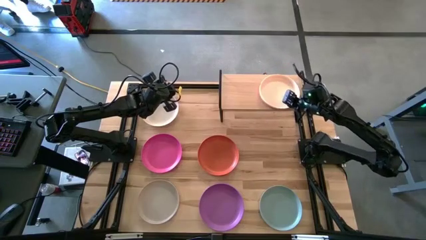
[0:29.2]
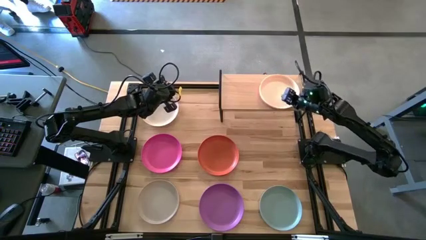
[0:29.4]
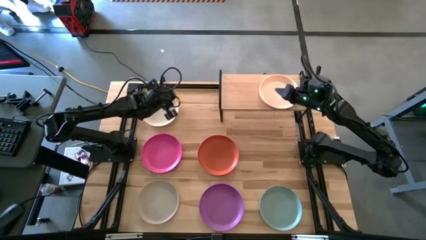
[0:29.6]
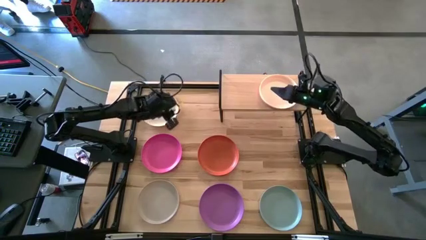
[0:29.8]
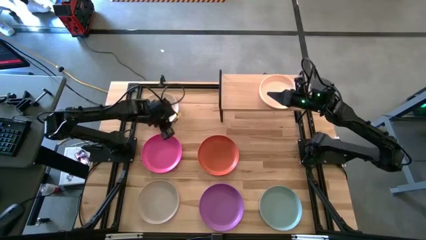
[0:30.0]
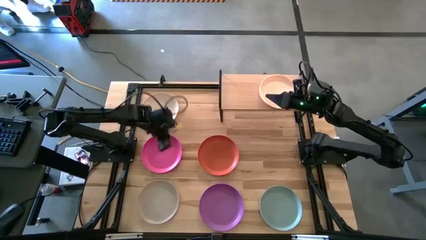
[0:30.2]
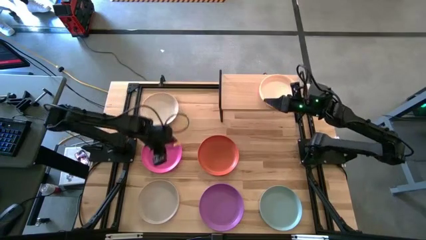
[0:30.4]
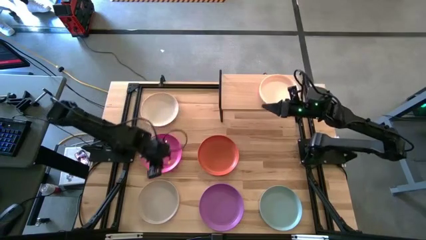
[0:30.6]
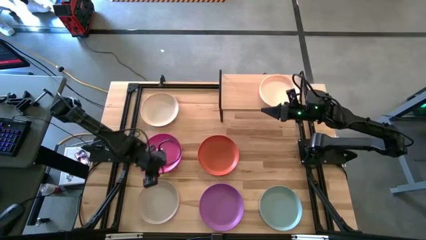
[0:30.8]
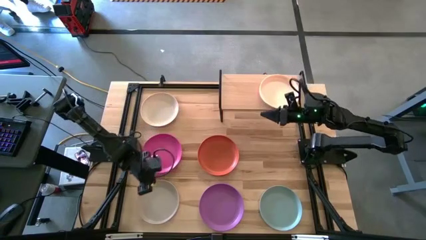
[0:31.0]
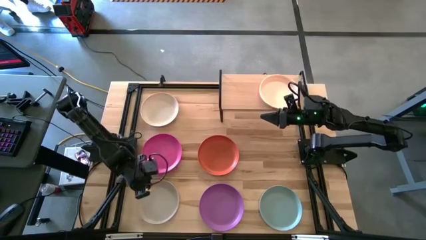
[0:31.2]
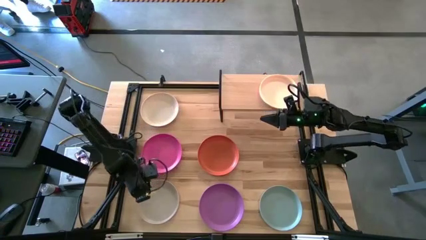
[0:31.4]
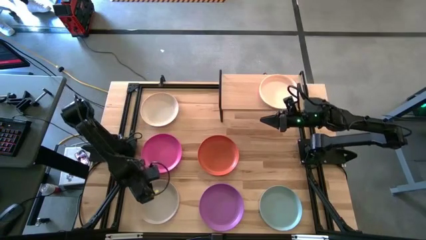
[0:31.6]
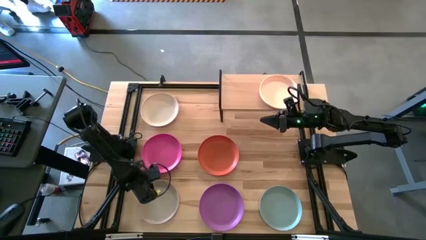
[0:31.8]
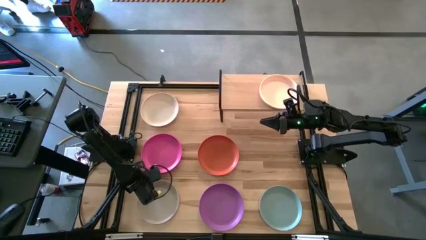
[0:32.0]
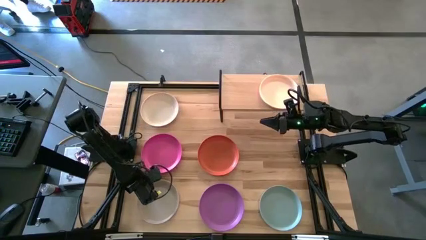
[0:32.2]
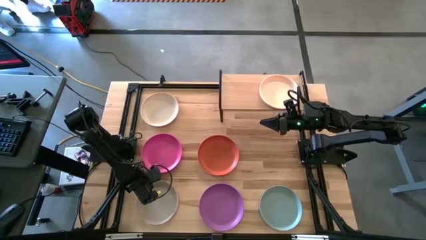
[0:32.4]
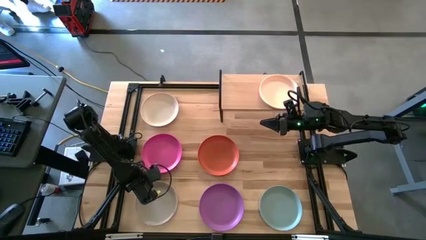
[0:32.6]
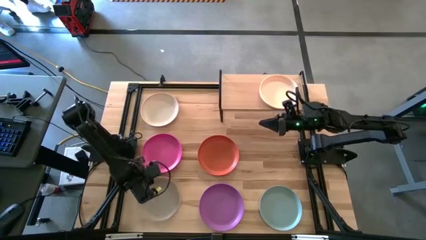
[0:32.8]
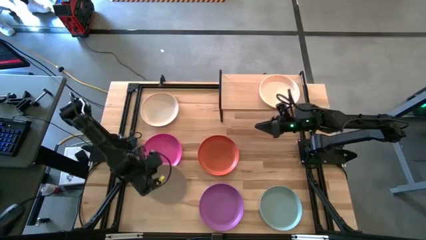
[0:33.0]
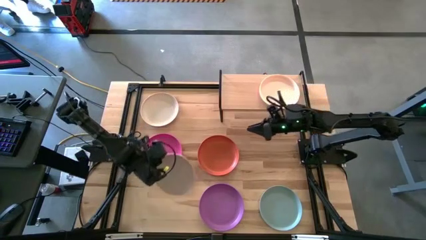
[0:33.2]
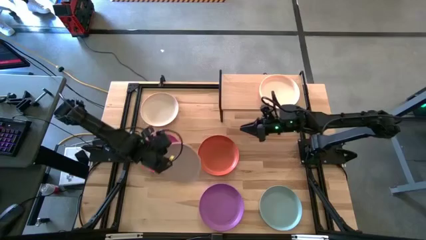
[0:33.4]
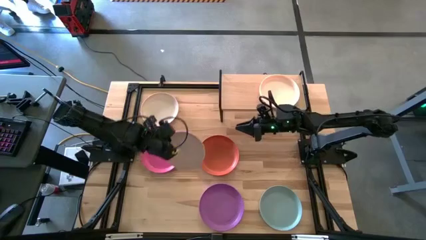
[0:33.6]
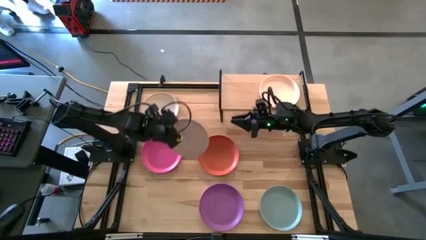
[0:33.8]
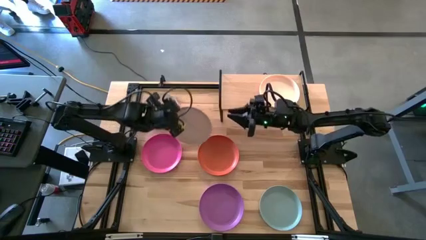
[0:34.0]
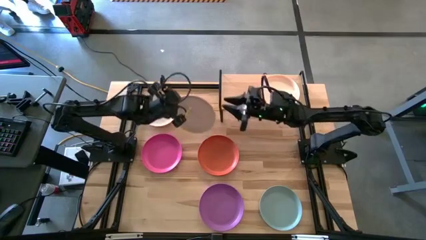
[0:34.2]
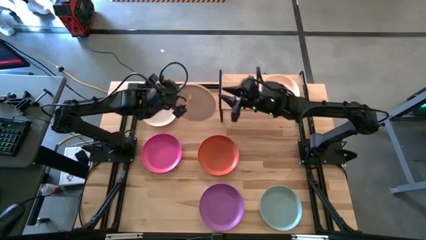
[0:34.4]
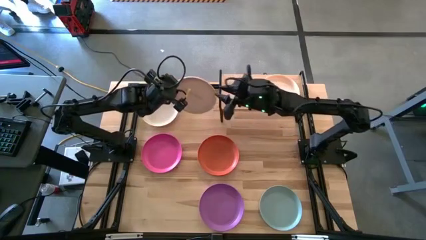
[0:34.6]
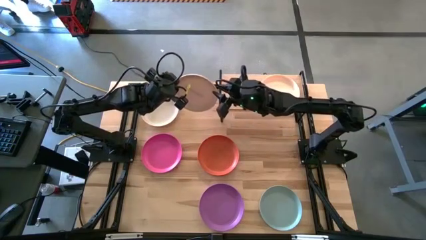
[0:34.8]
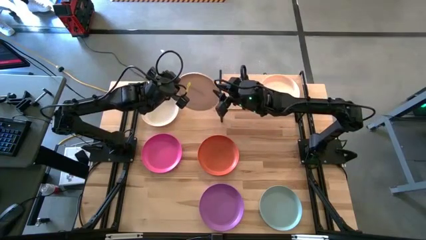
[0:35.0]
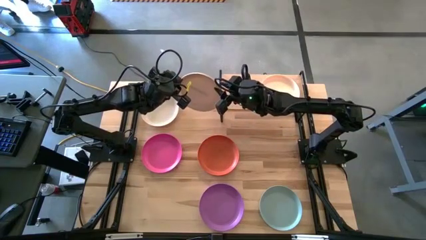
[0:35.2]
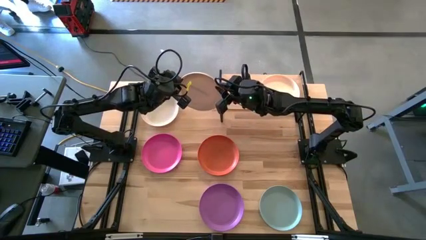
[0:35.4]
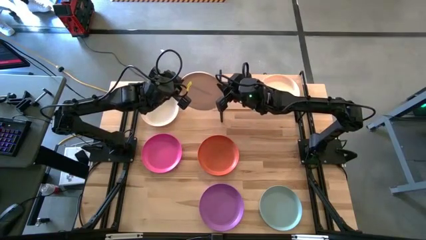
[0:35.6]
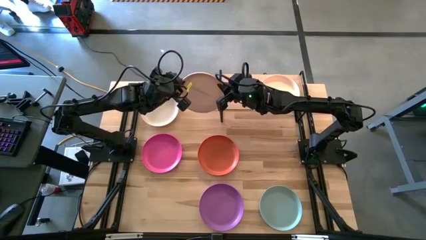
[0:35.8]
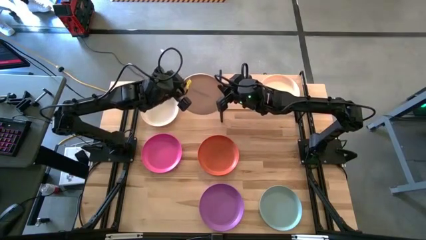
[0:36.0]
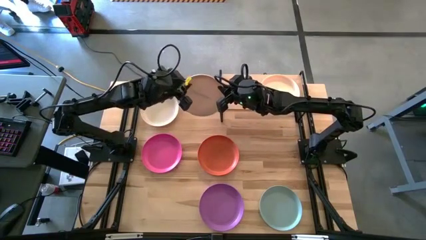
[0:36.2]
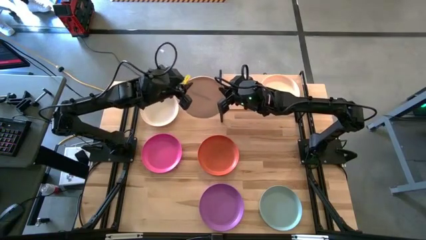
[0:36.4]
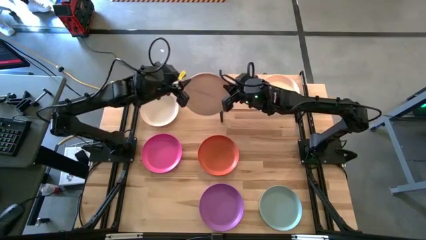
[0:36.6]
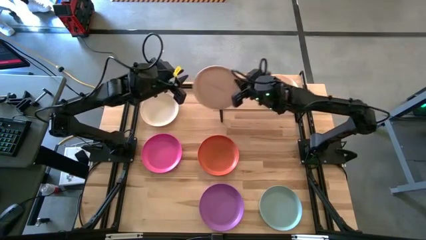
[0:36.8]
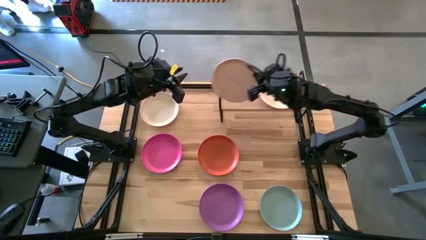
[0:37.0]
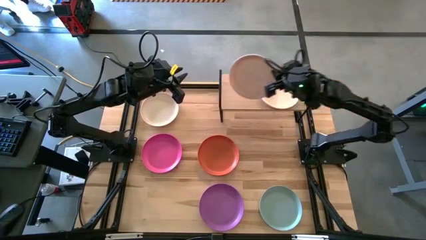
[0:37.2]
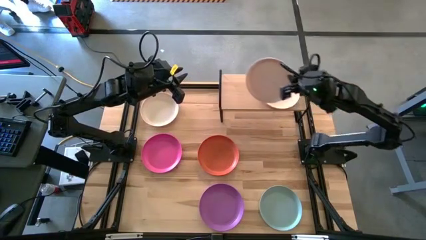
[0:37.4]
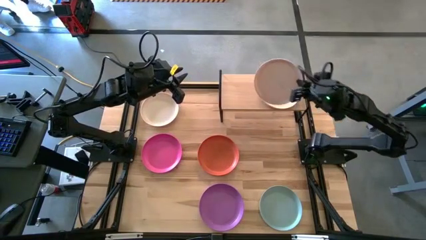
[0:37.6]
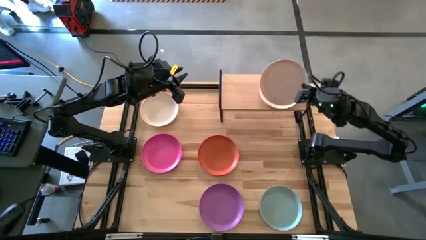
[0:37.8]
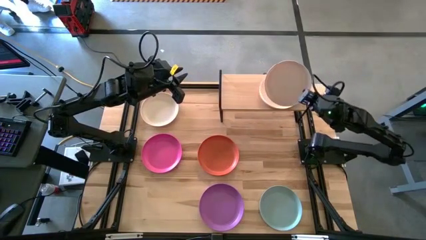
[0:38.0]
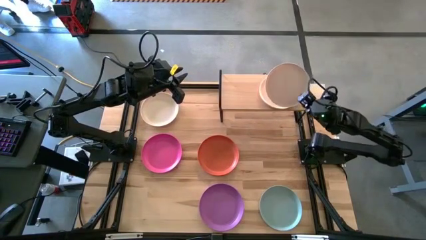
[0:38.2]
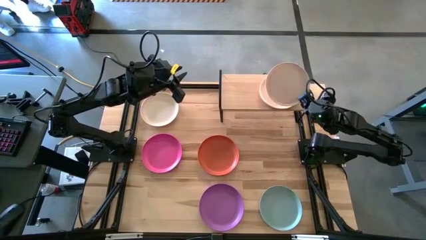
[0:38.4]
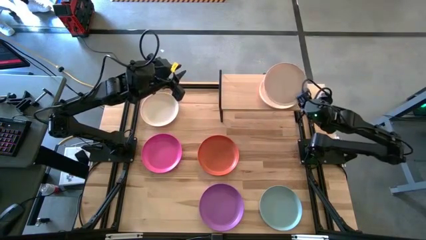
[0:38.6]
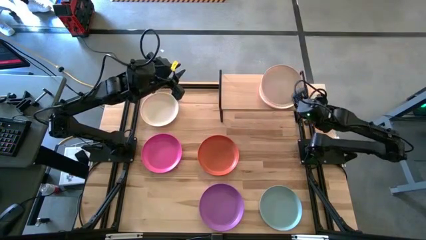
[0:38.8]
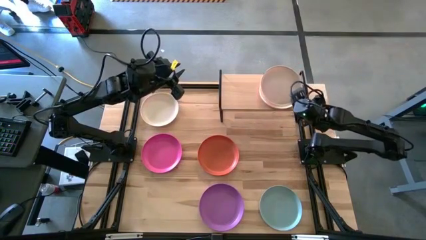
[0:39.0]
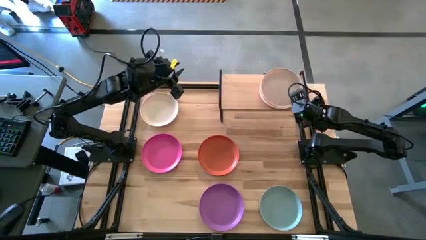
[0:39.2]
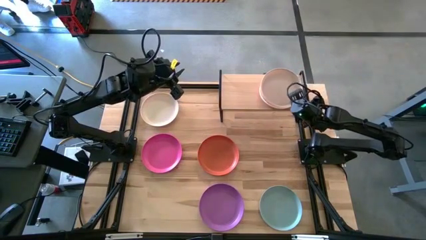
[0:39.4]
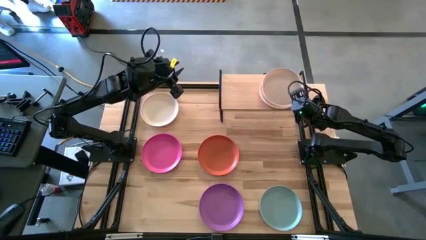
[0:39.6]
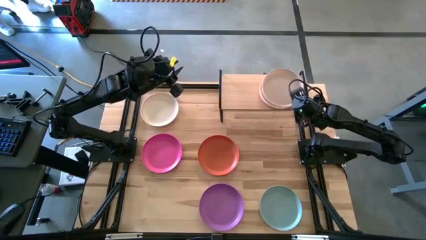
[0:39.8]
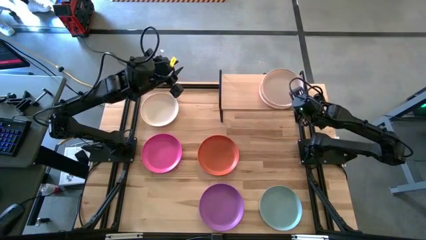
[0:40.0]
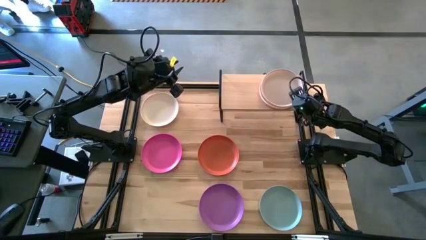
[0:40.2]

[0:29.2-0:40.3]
Task: Place and stack plates onto a shelf
Stack the gray plate on top of the light yellow plate on the shelf
